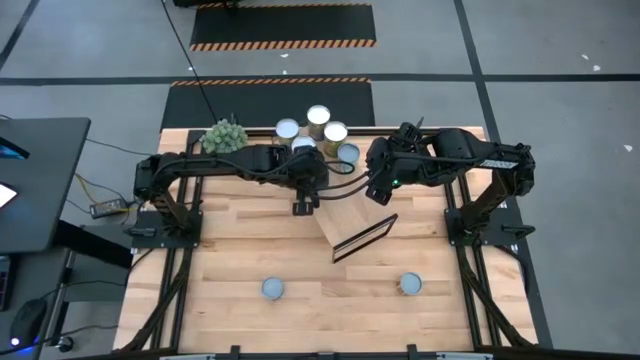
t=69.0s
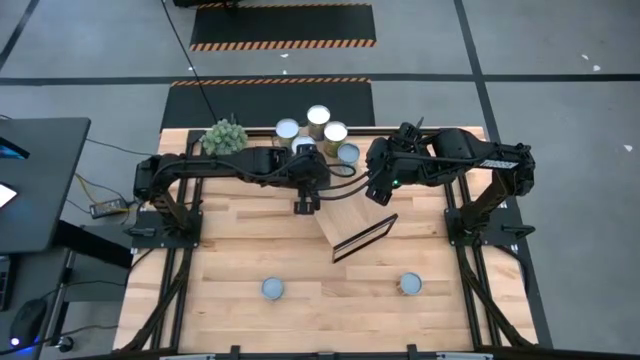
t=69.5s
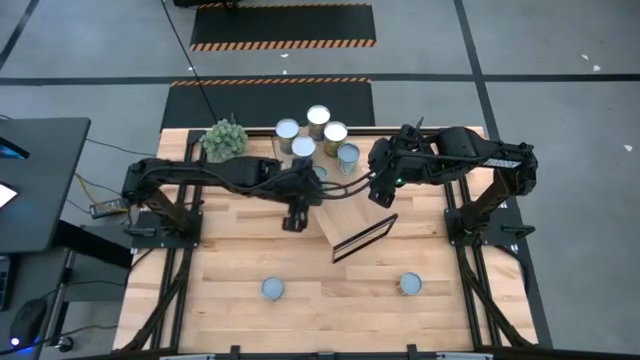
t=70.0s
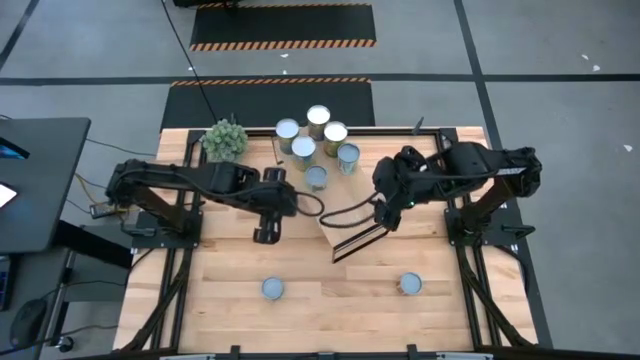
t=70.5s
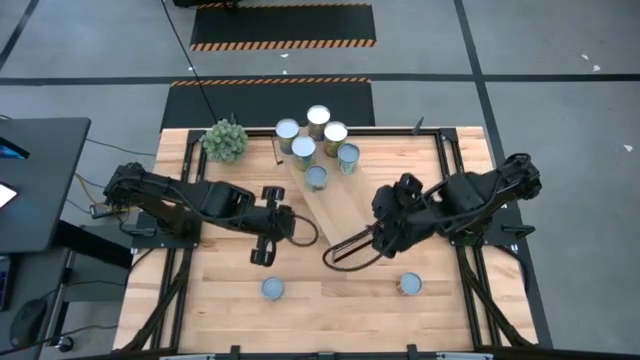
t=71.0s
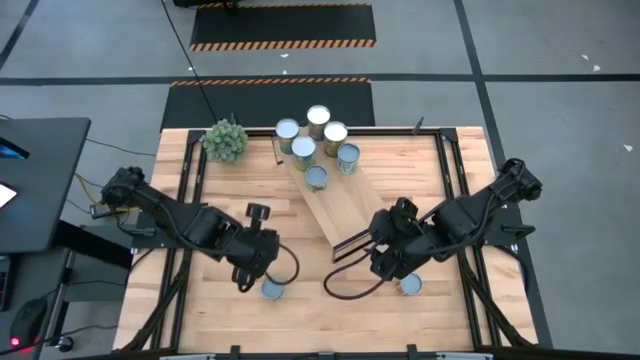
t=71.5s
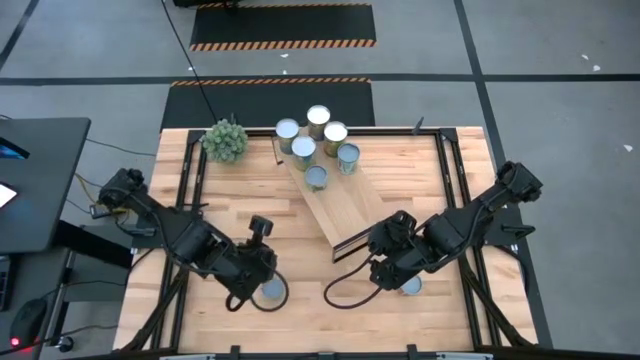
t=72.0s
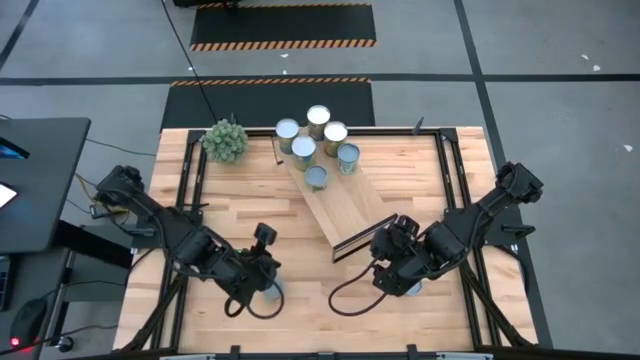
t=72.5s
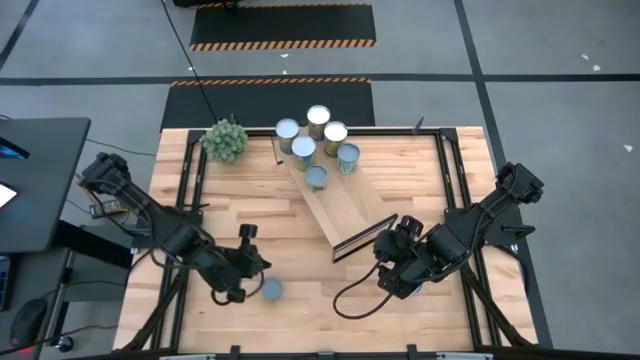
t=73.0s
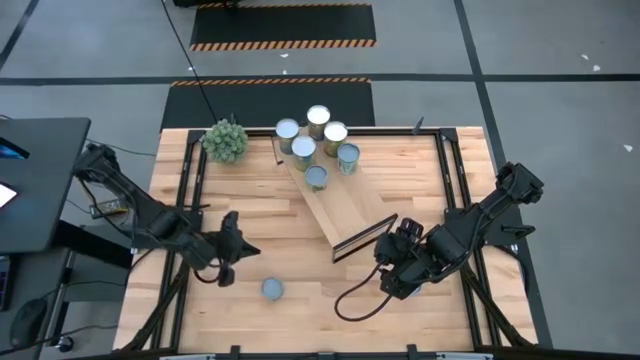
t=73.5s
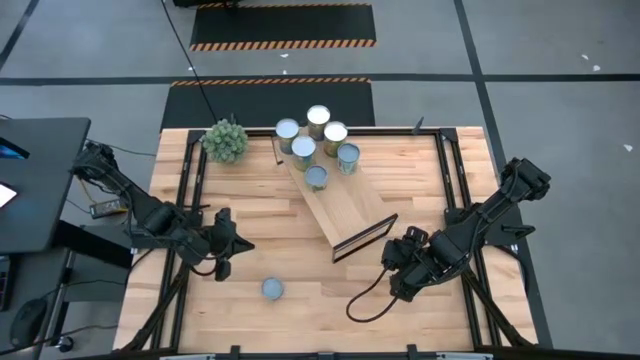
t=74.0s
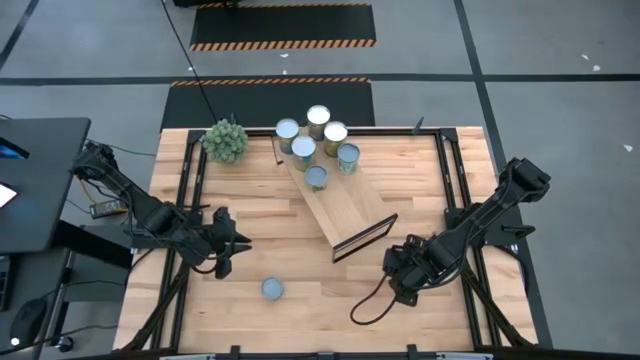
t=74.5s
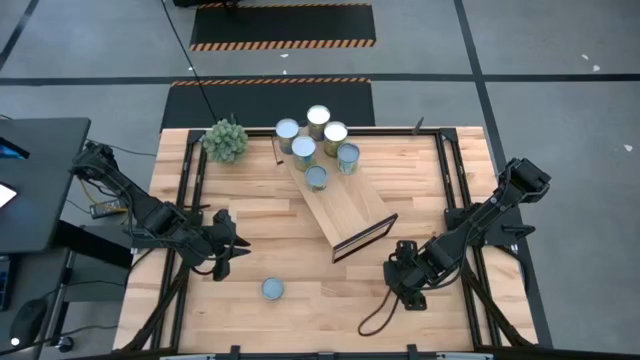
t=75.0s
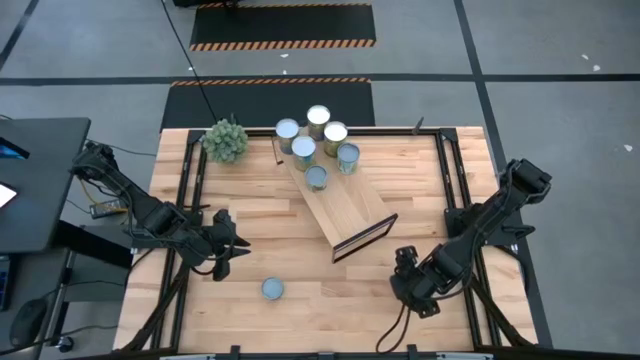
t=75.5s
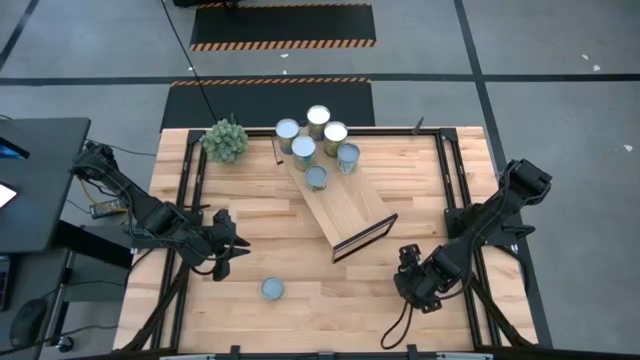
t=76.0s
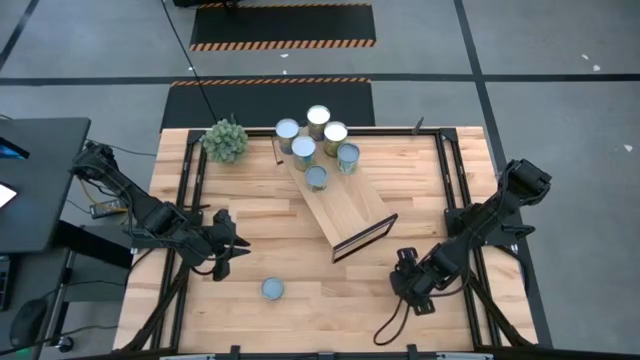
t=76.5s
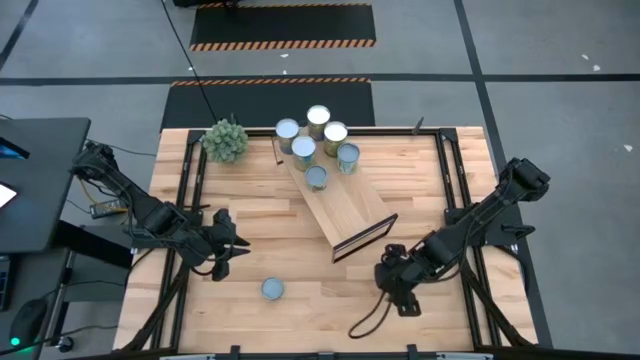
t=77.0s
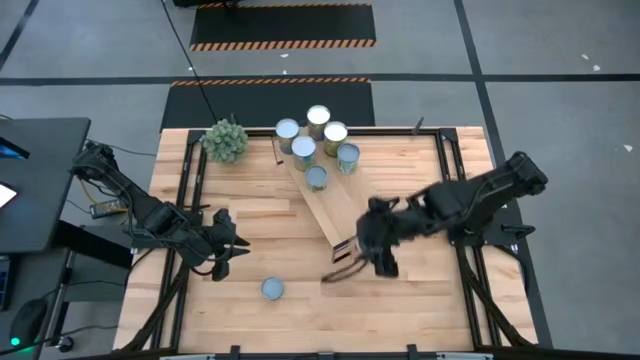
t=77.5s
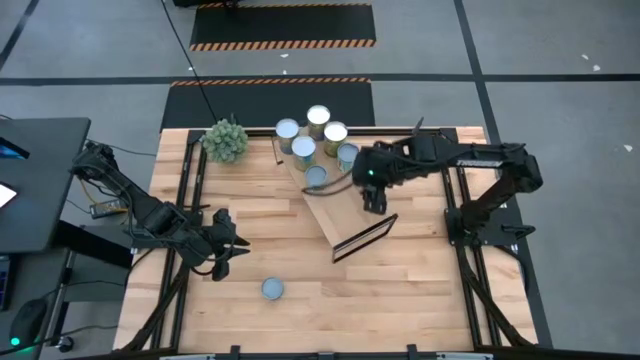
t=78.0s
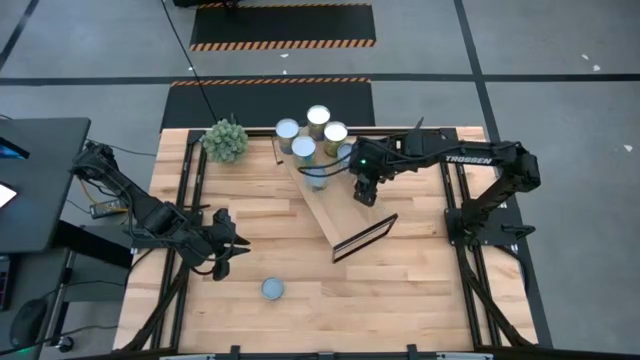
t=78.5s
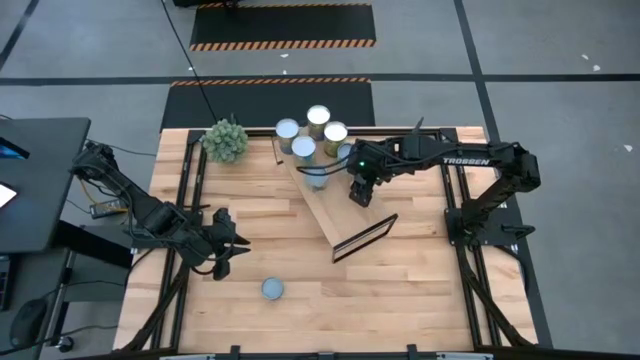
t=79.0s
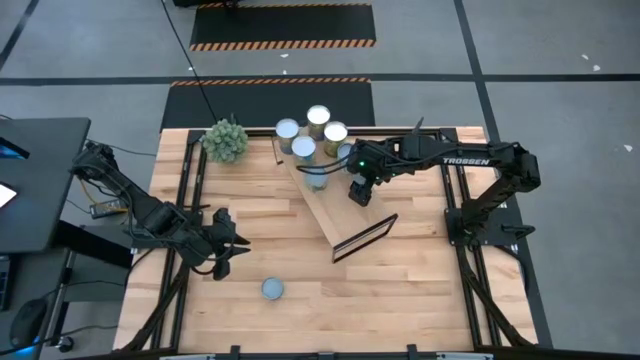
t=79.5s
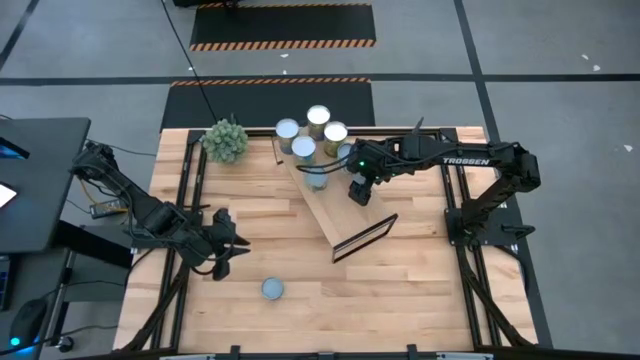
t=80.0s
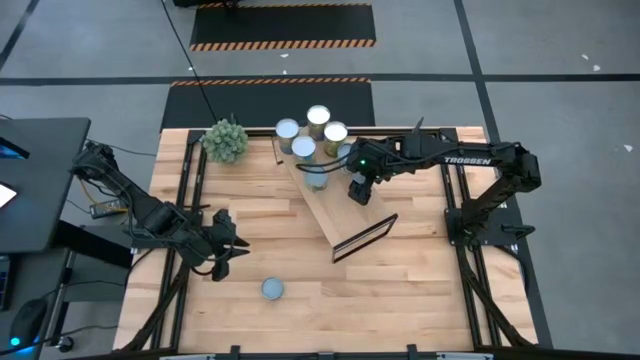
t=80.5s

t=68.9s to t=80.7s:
Task: Pick and place cans onto a shelf
Put the canned tomatoes on the shelf

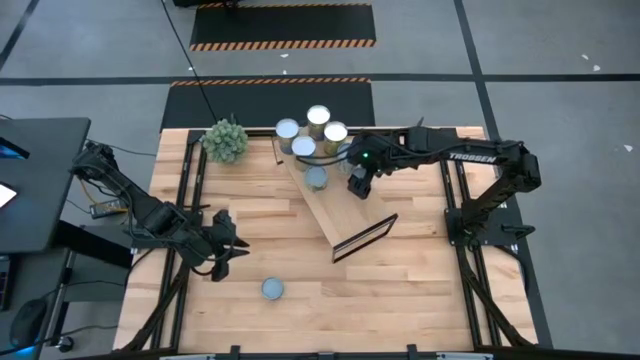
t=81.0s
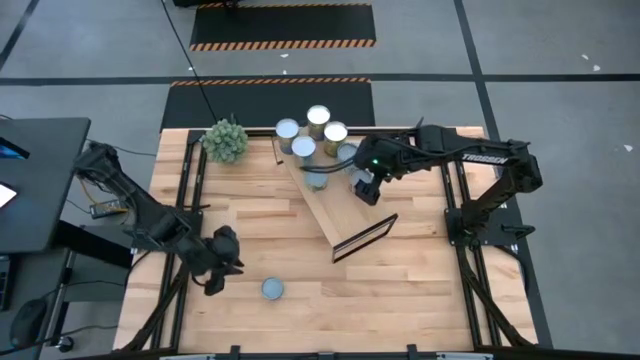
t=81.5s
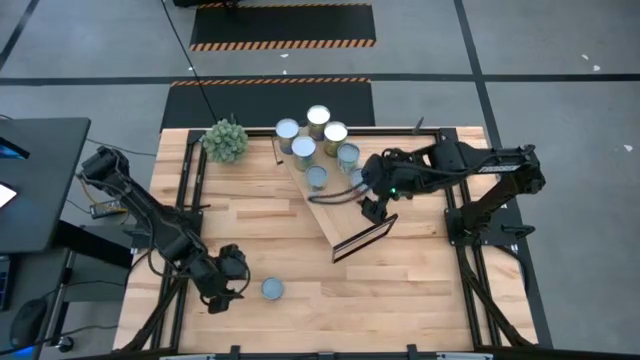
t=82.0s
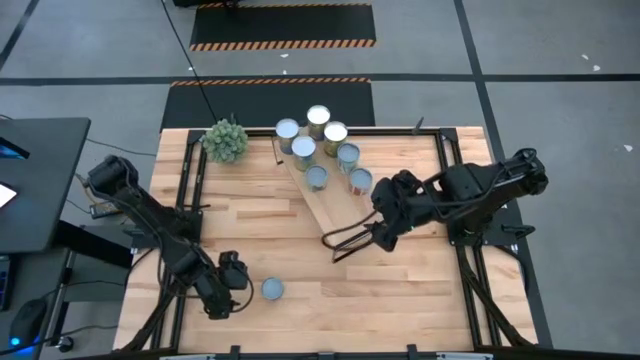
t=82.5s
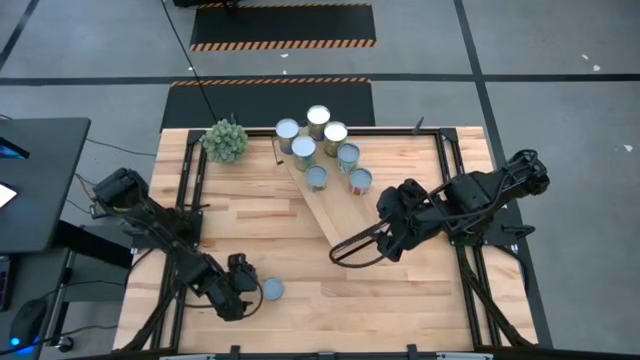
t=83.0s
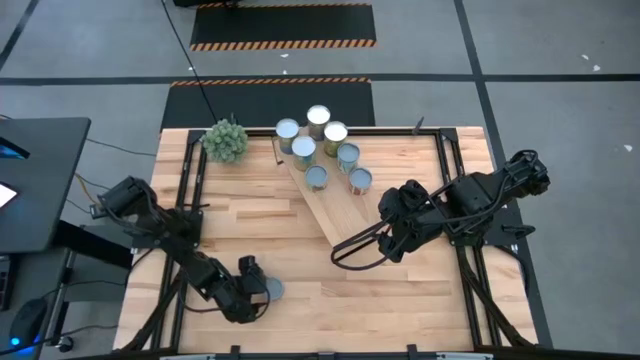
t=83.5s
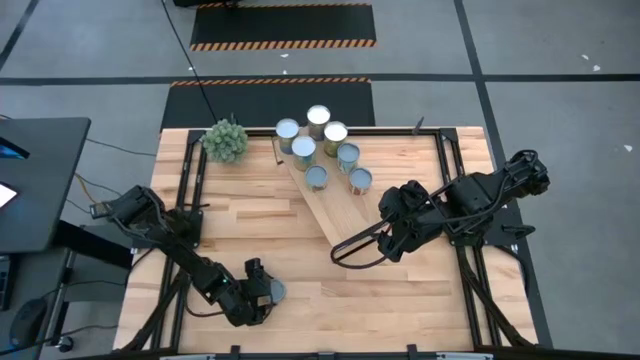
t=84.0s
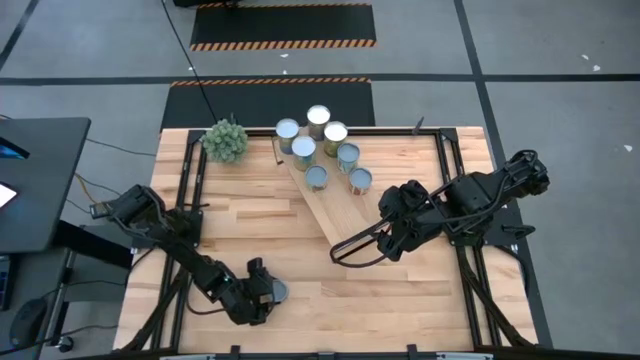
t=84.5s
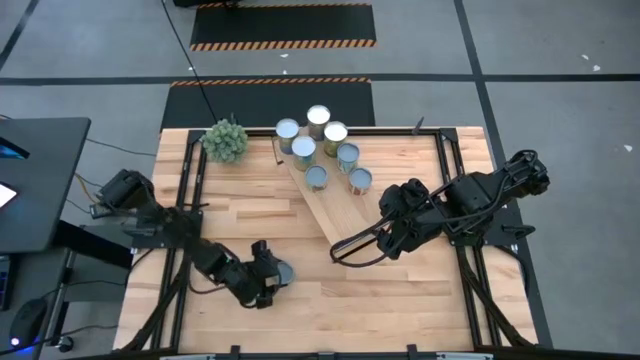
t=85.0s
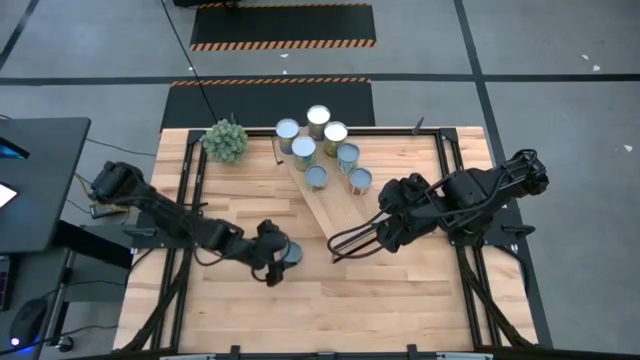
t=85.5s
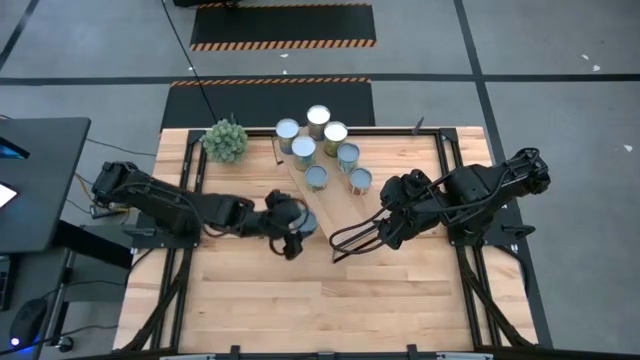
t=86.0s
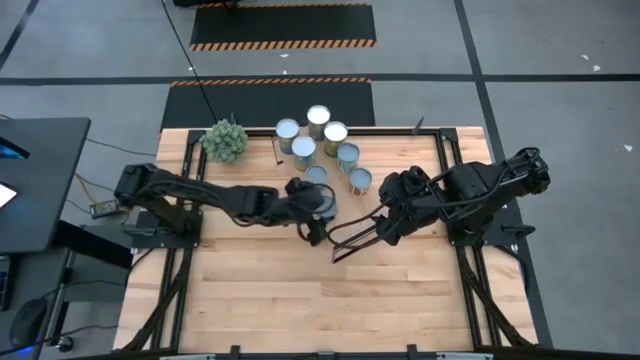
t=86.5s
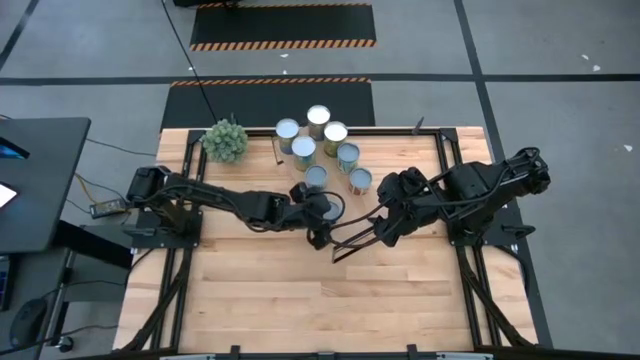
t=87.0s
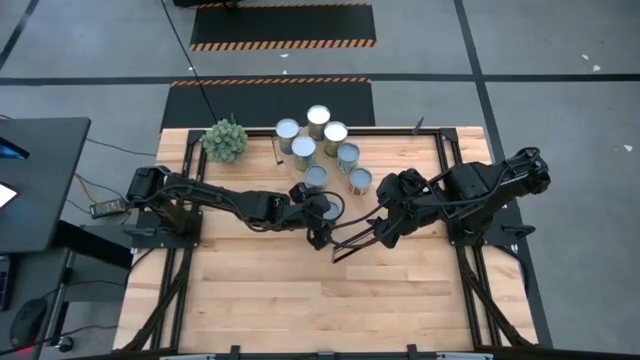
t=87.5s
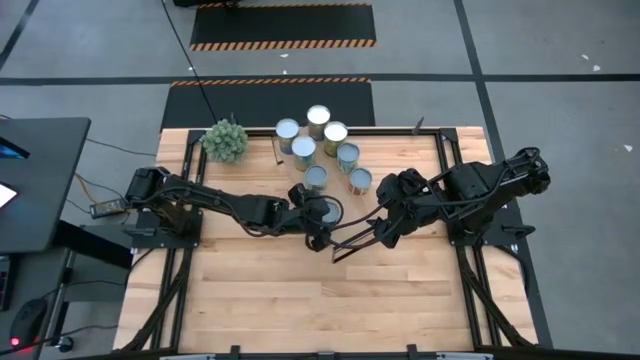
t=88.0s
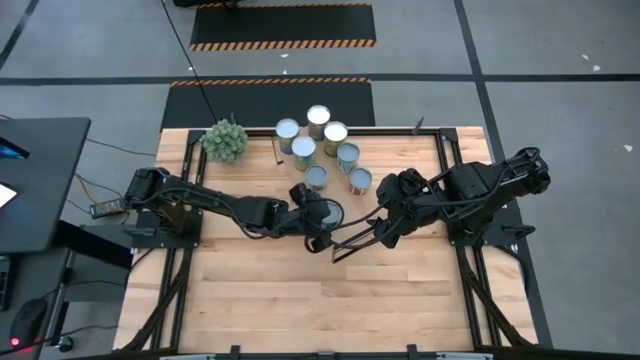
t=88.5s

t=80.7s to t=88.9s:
Put the canned tuna on the shelf

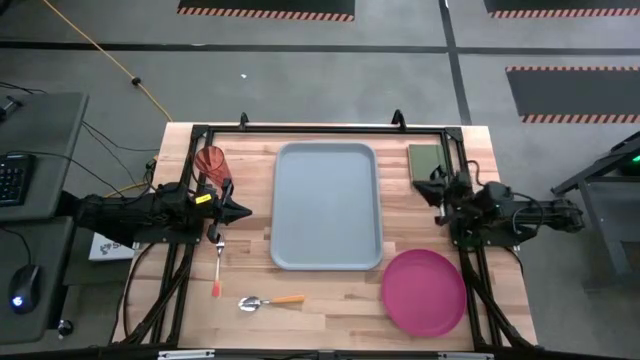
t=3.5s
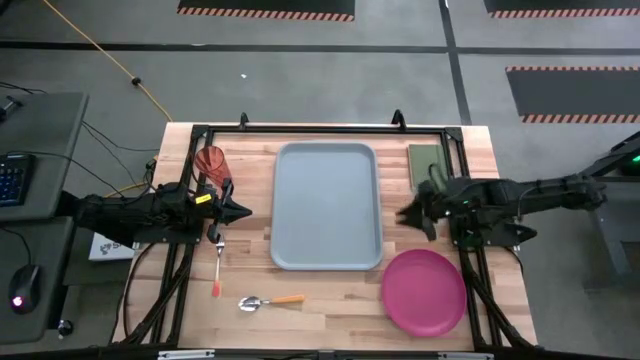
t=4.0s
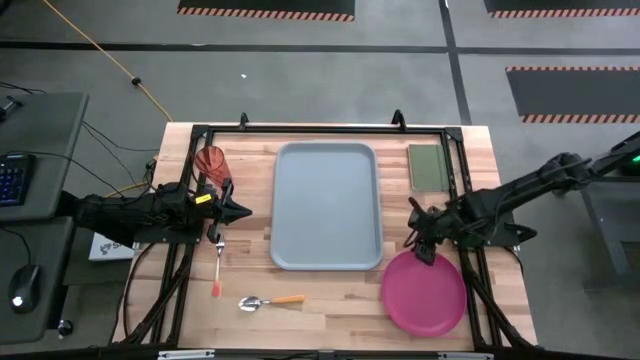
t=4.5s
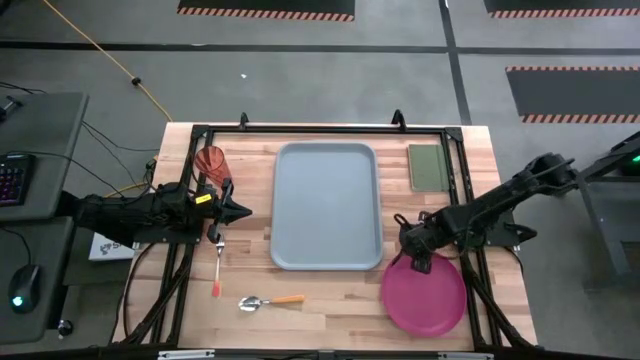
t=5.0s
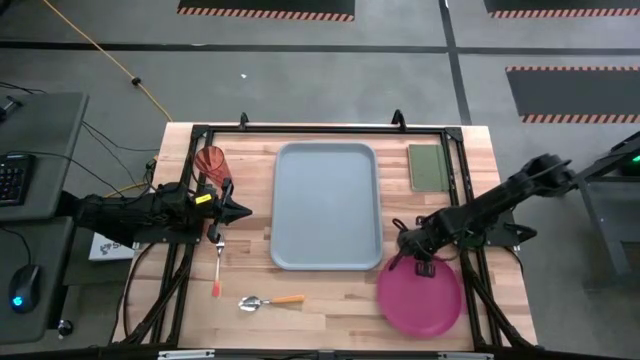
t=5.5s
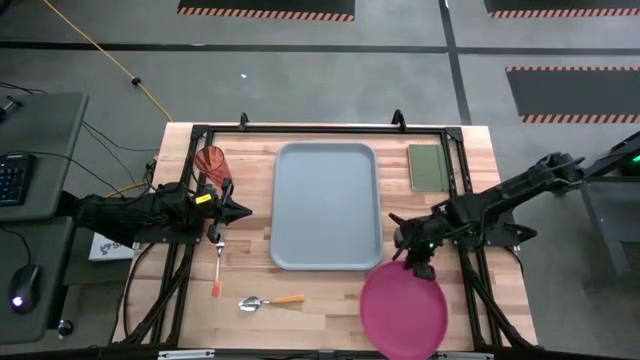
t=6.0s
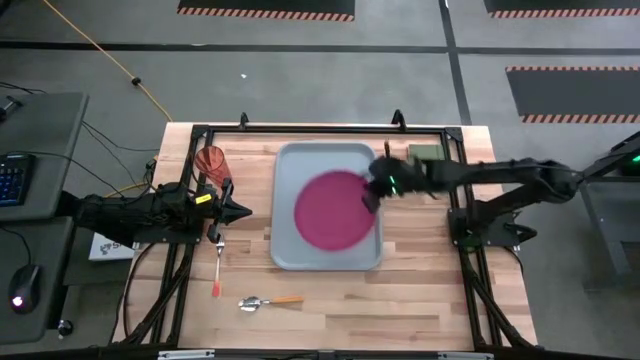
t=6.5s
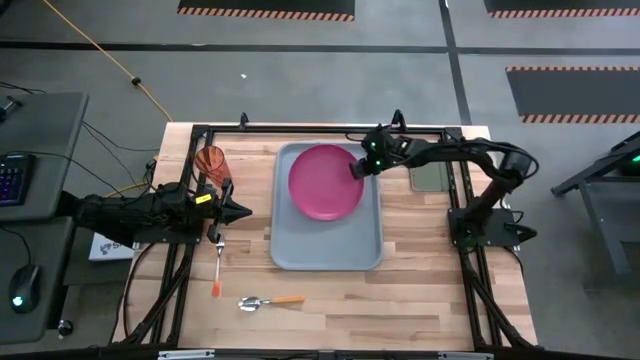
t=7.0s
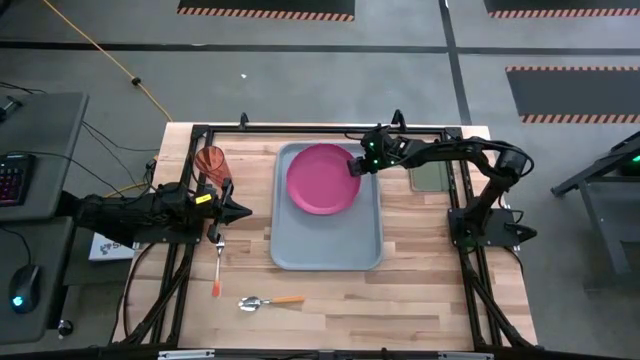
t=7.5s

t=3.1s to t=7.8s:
Task: Pick and place plate/cup/fork/spoon on tray
Put the pink plate on the gray serving tray
